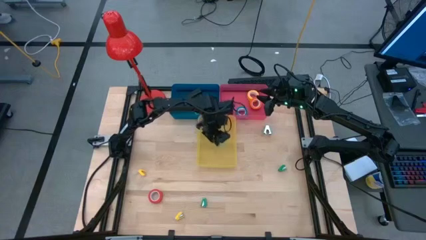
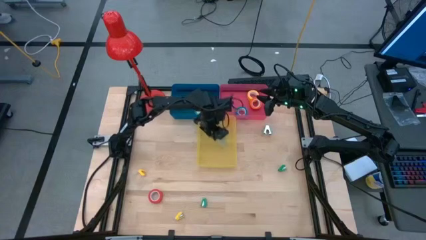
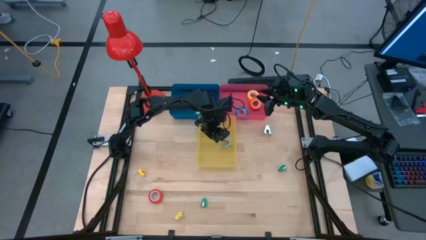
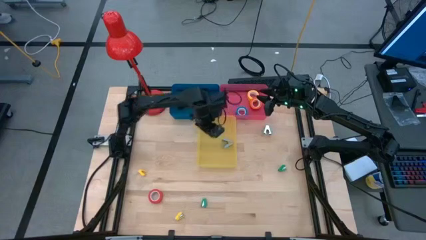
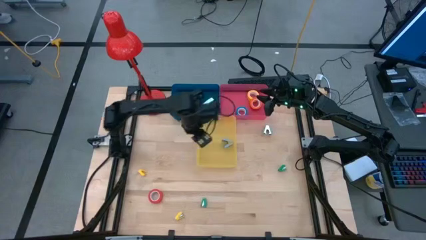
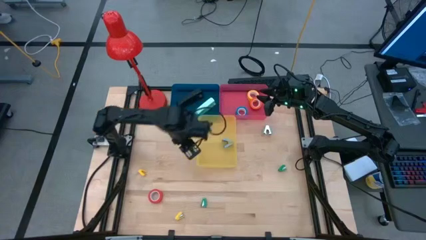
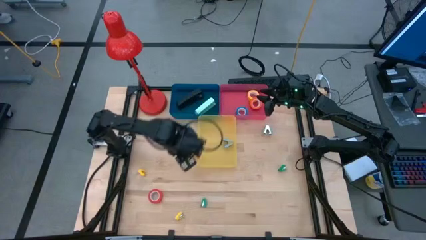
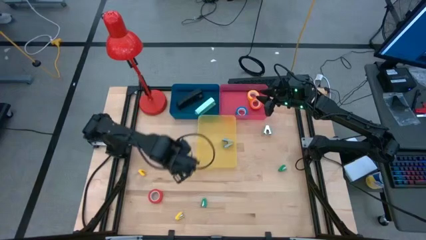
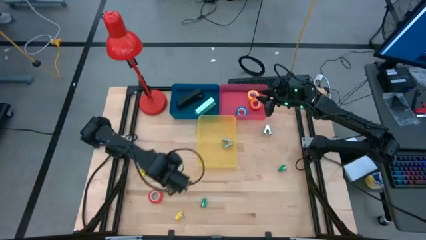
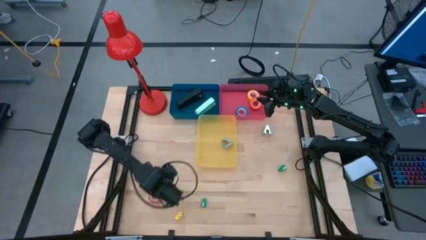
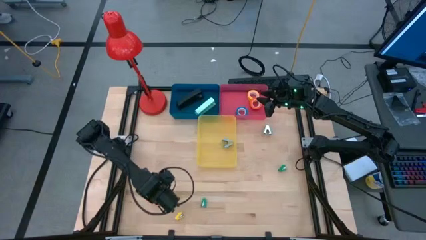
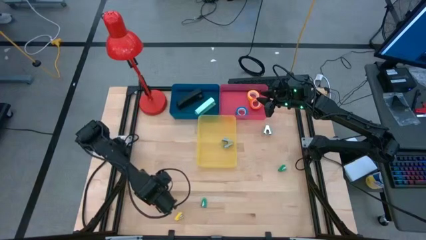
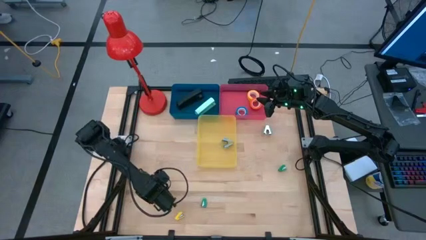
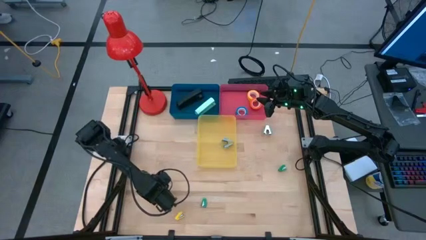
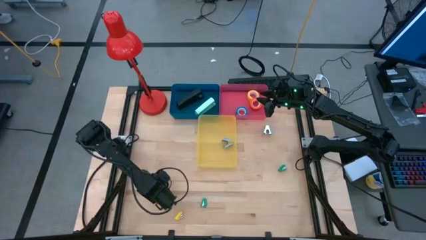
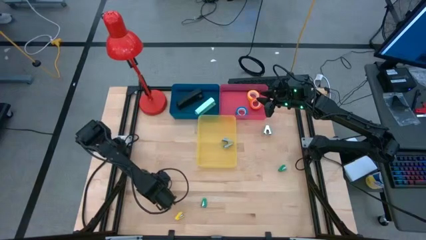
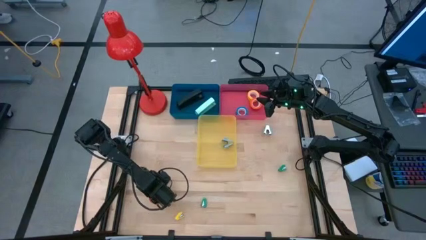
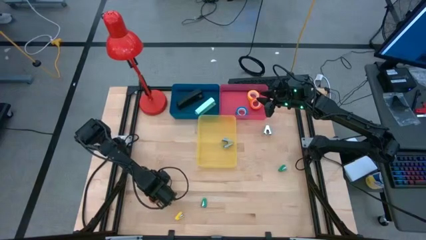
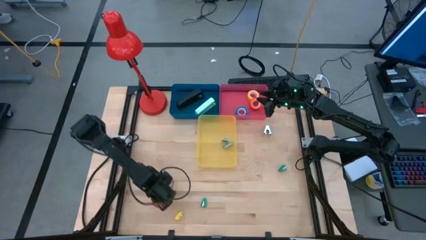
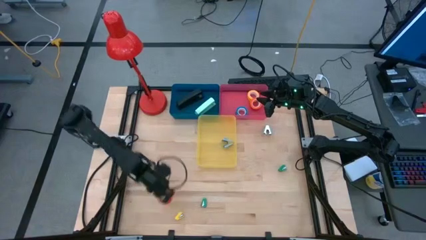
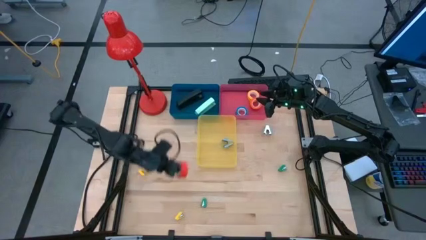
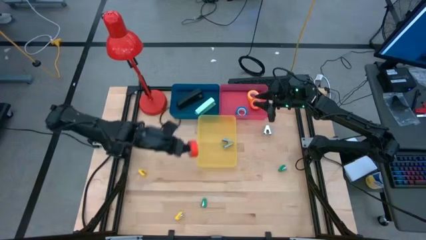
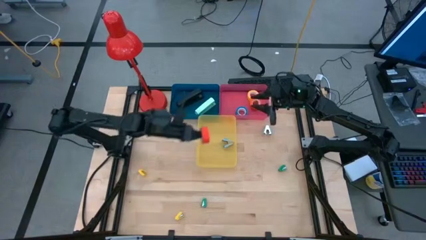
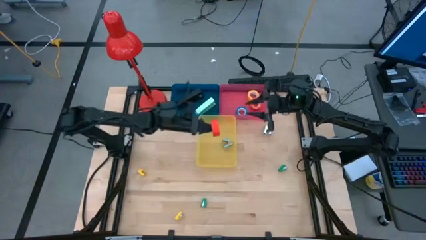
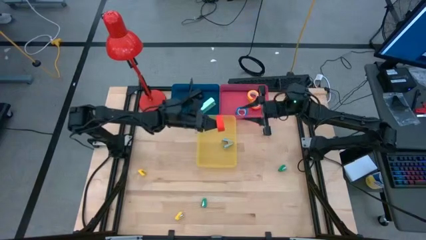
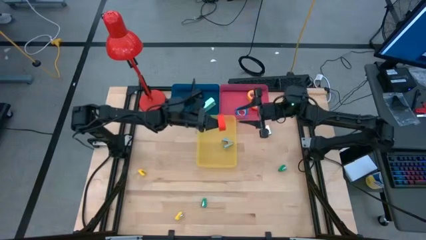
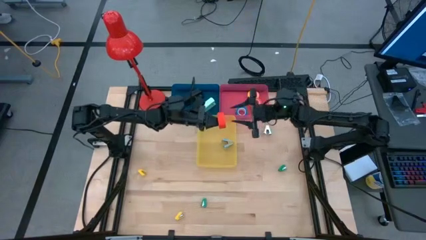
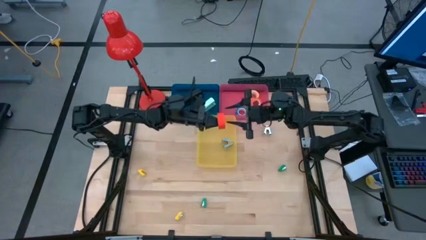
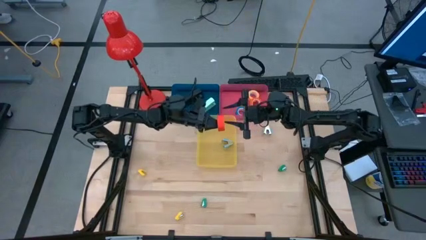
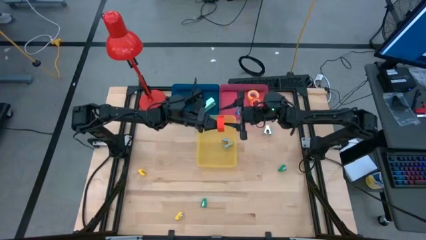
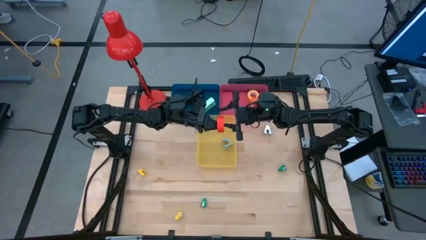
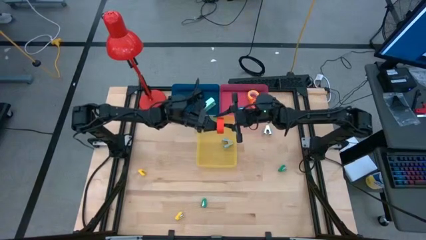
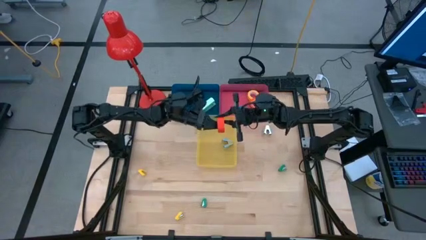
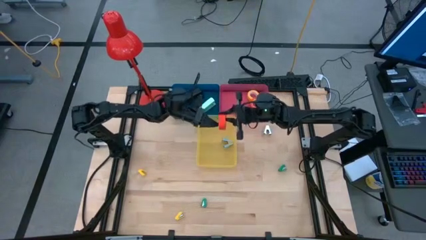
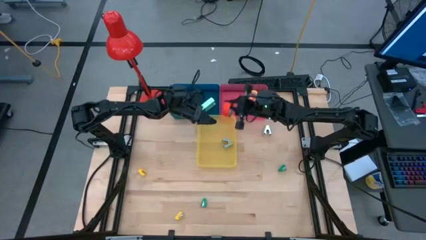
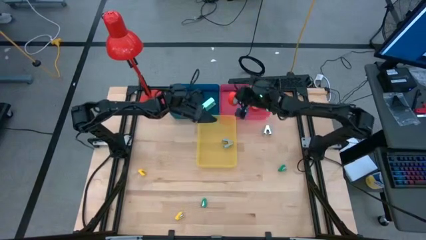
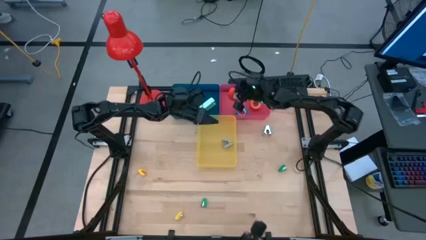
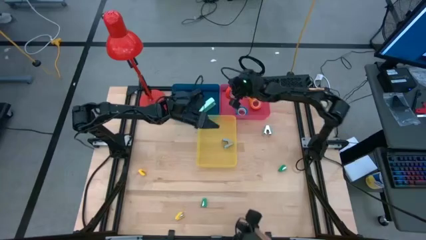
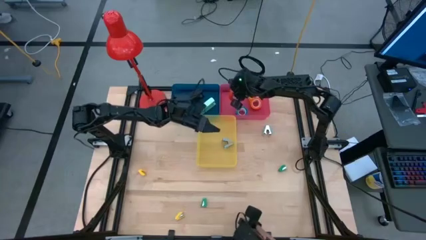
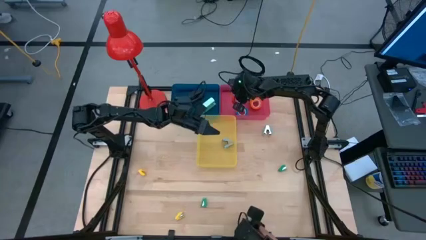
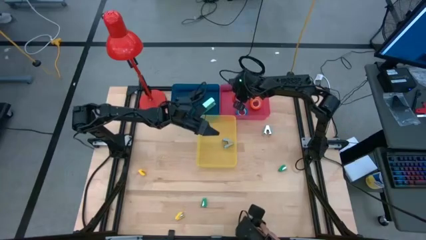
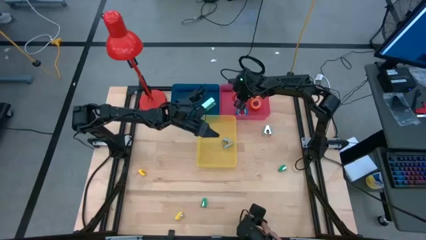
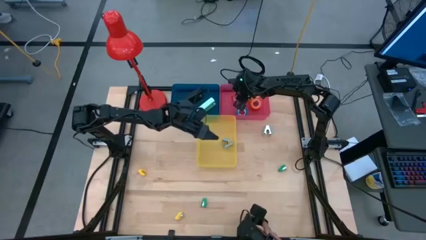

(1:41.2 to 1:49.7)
Task: Pick and place Stapler, Stapler remover, tape
Put the red tape into the pink bin

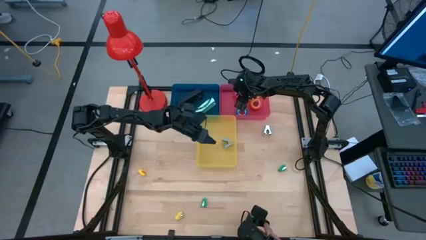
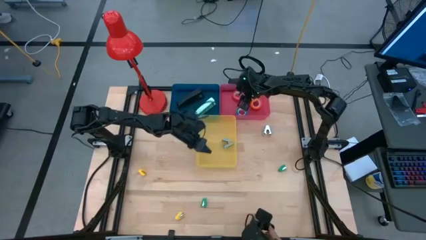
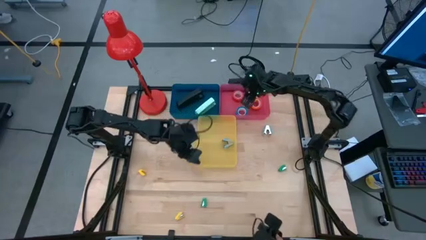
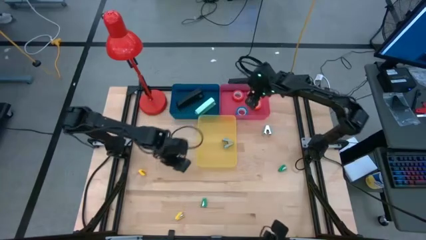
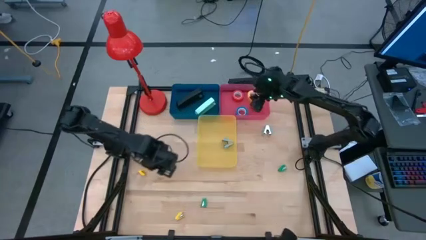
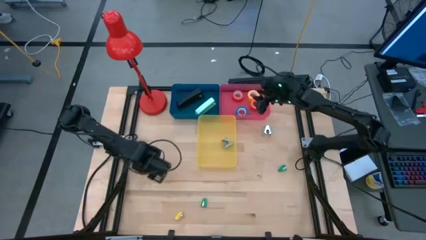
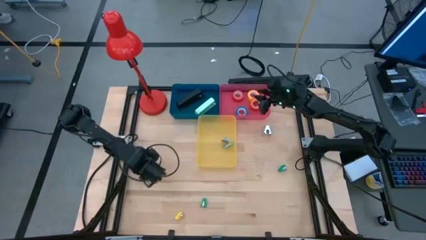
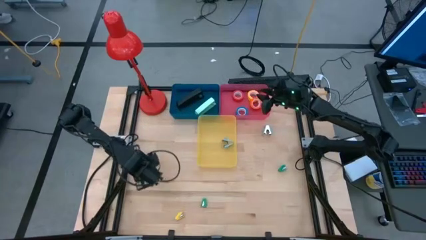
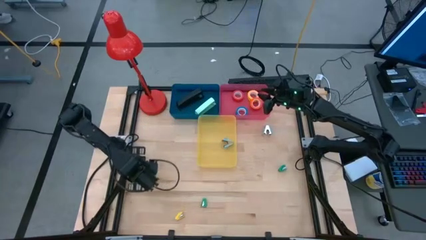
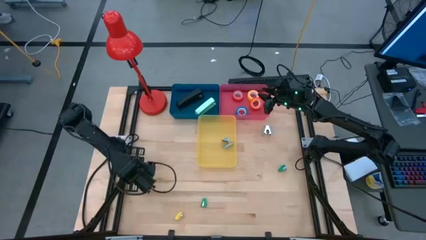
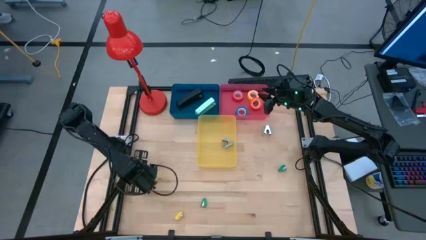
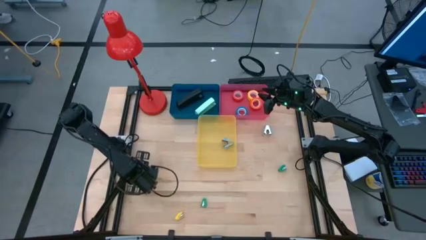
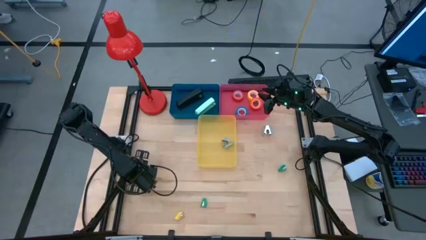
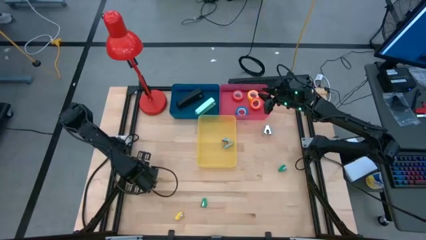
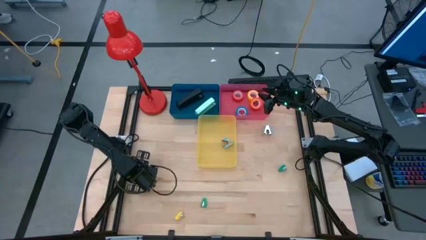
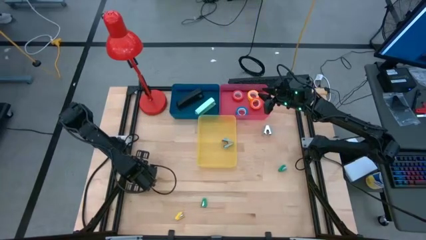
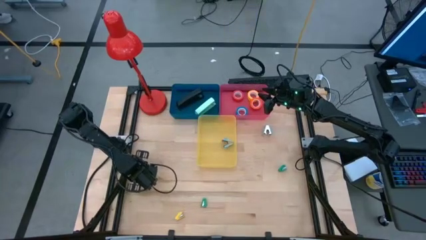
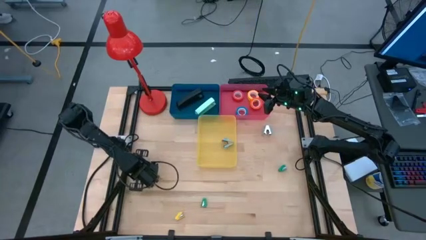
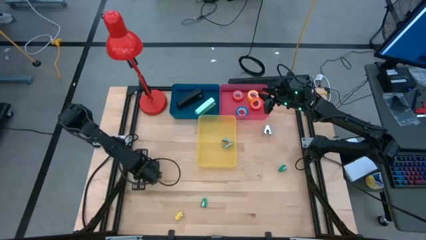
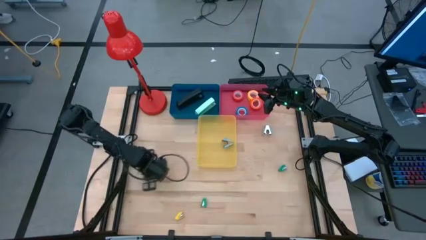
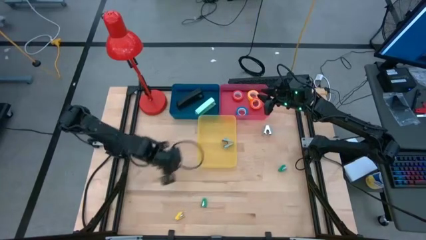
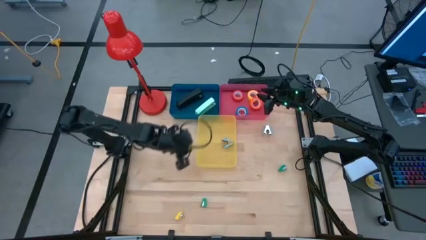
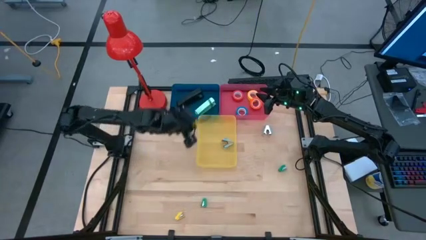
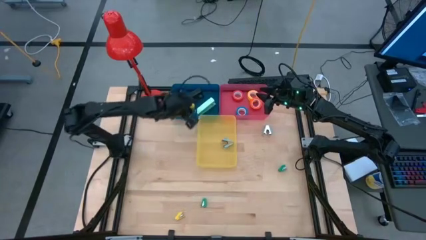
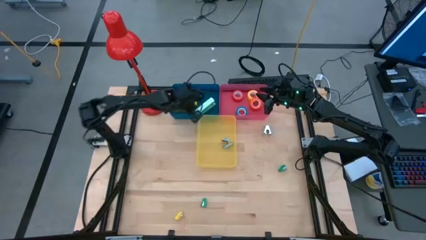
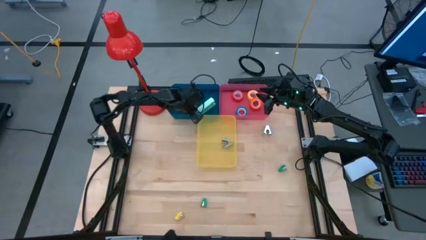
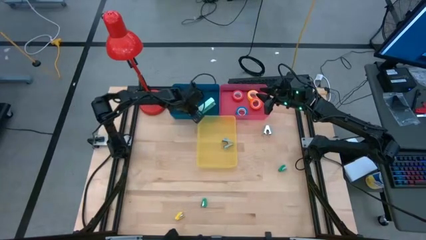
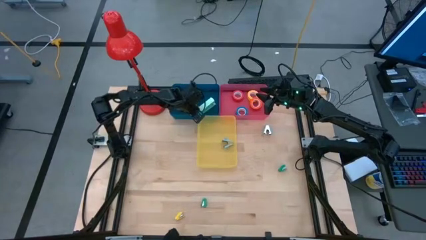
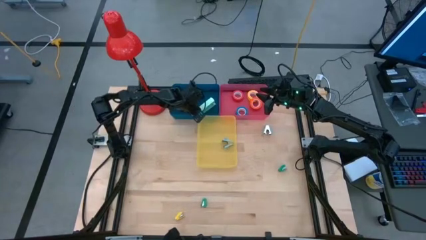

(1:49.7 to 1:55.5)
Put the top small yellow stapler into the blue bin

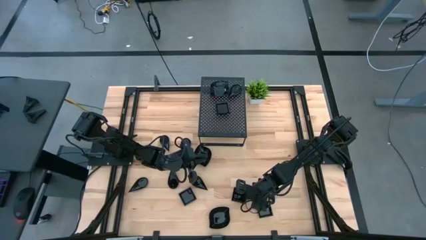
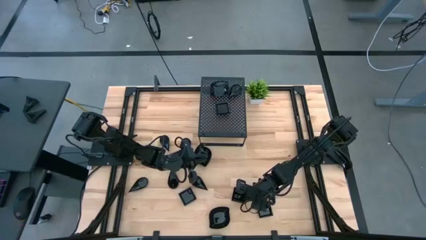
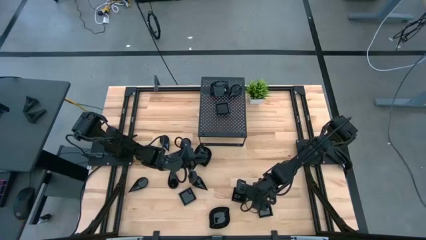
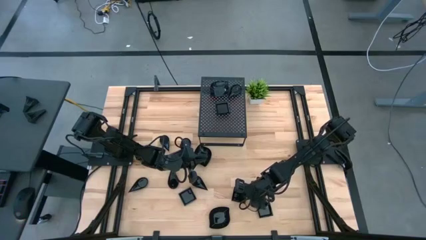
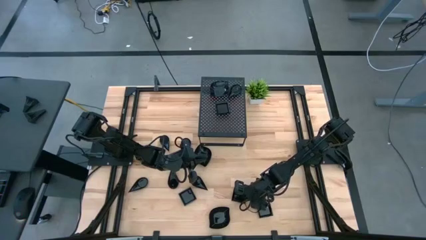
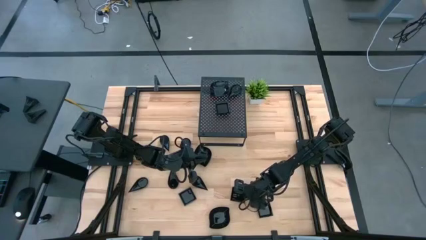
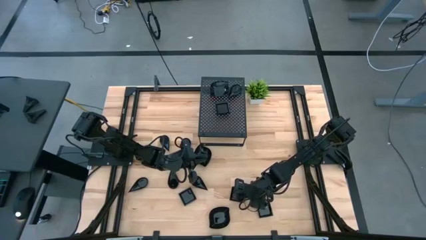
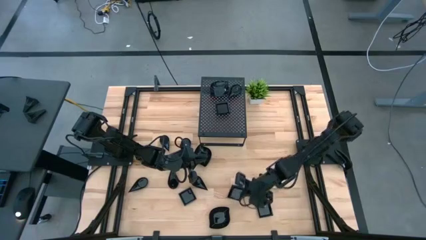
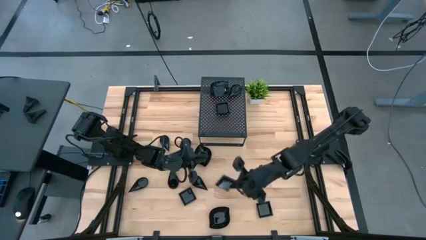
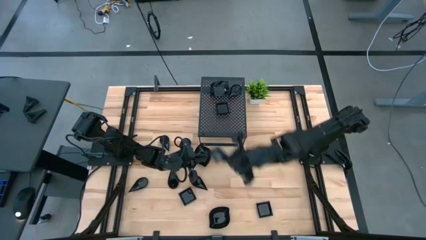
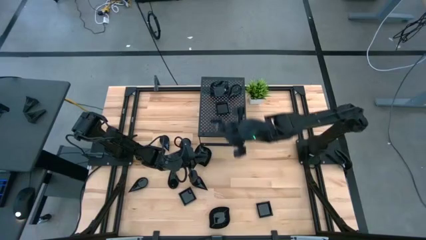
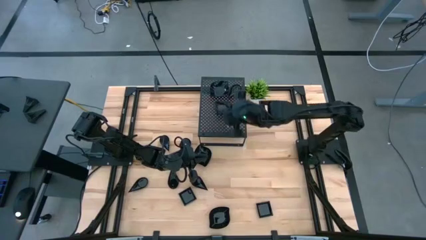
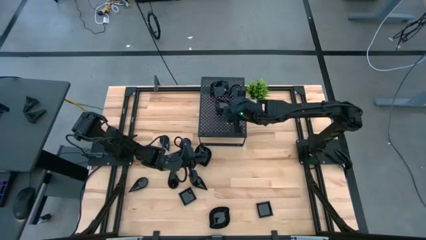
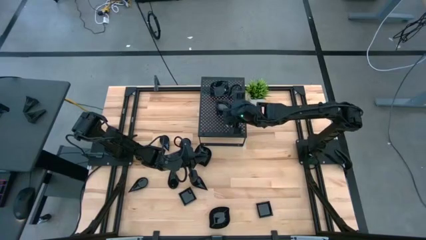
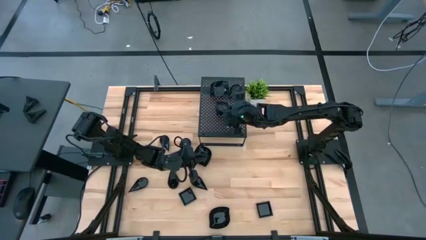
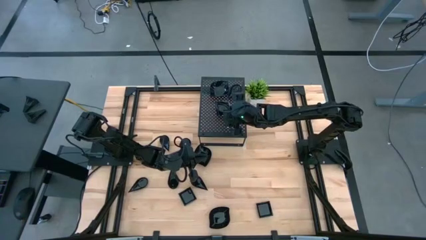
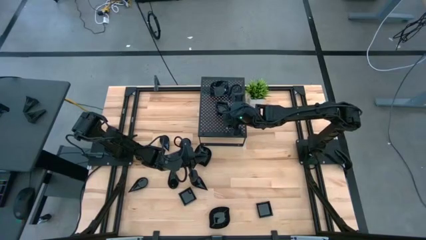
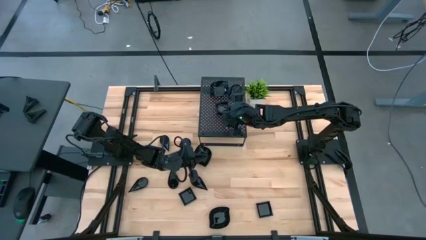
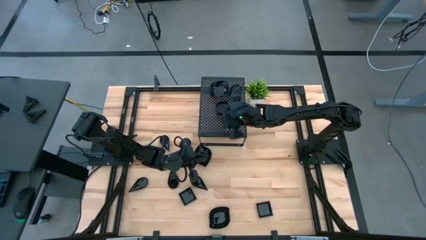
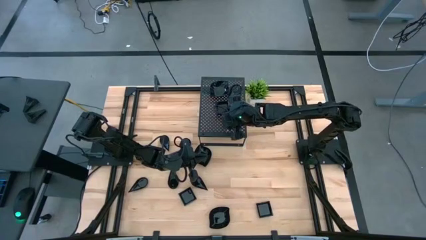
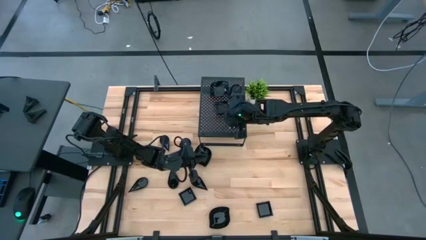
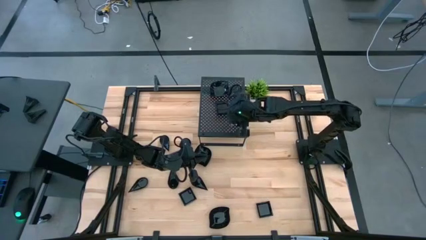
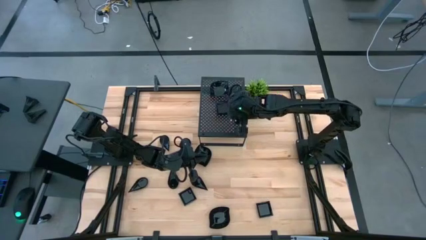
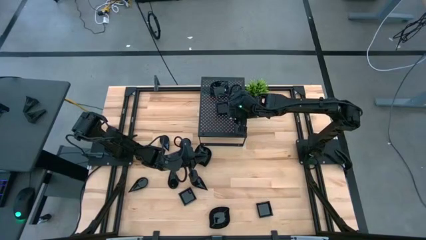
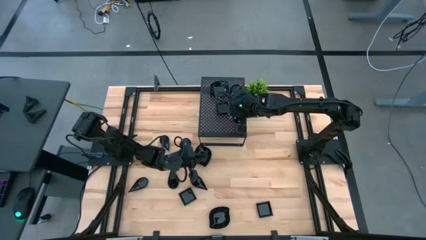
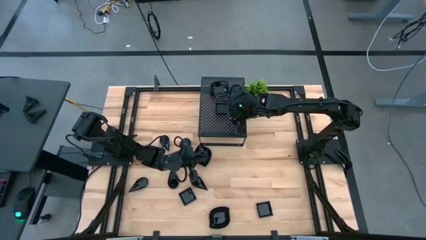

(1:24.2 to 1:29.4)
Task: Pick & Place Mini shaped plates
Stack the black square plate on top of the black square plate on the shelf
